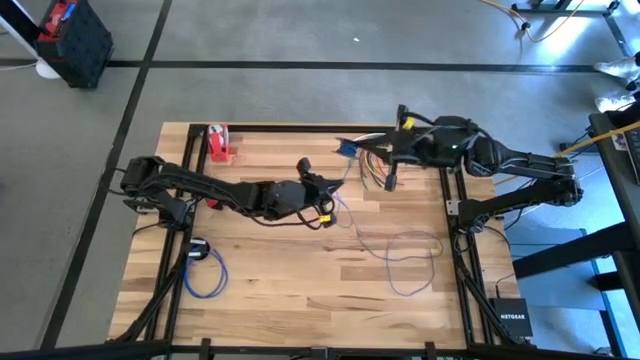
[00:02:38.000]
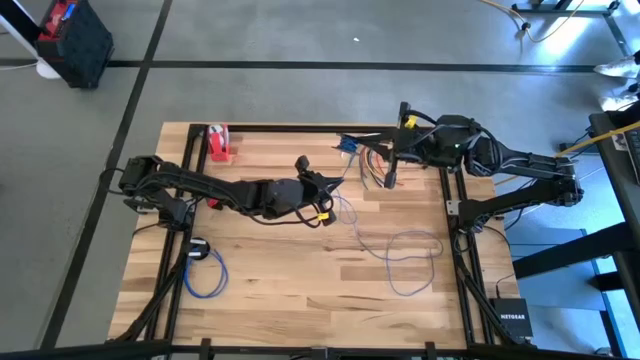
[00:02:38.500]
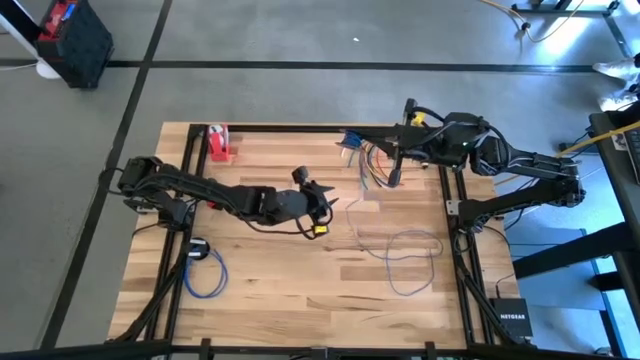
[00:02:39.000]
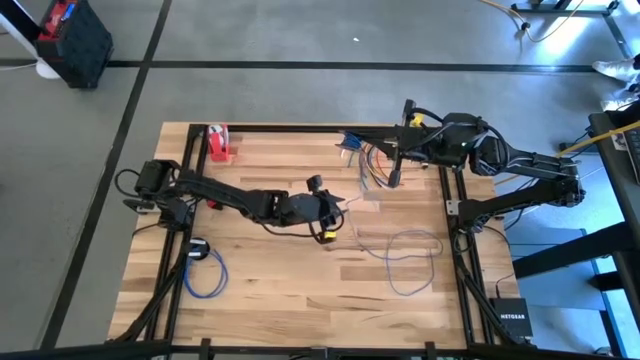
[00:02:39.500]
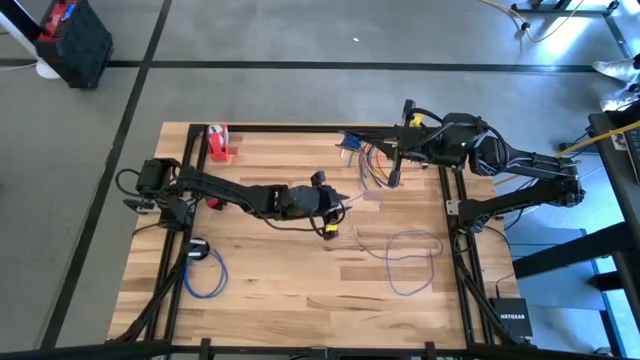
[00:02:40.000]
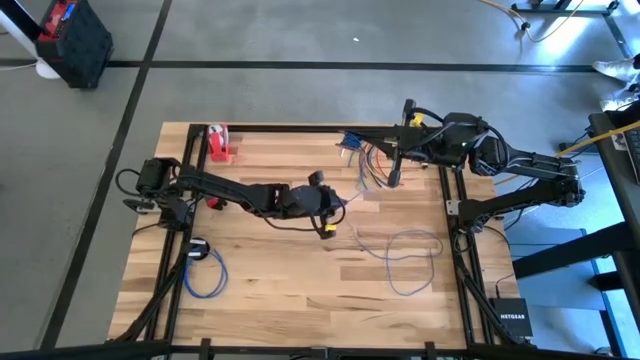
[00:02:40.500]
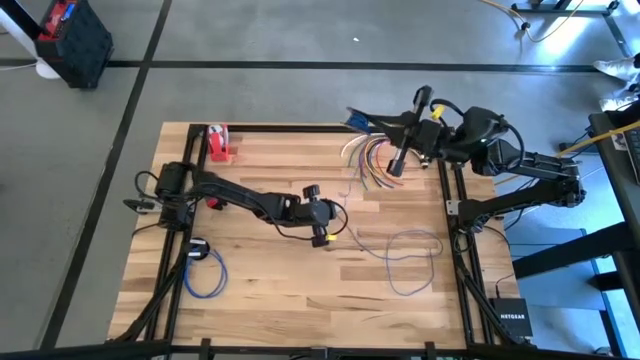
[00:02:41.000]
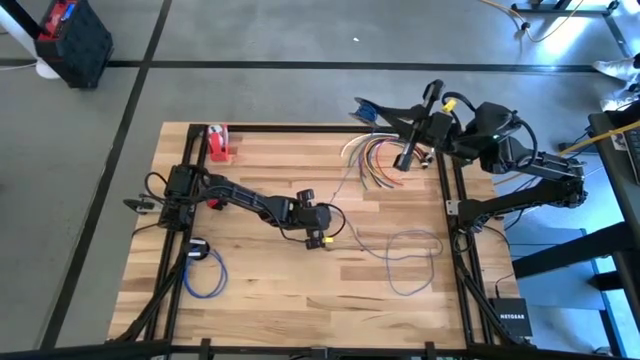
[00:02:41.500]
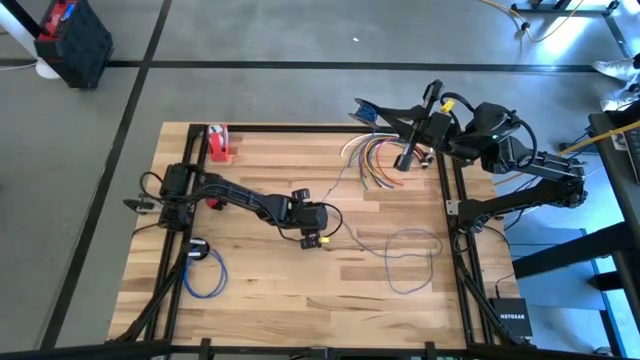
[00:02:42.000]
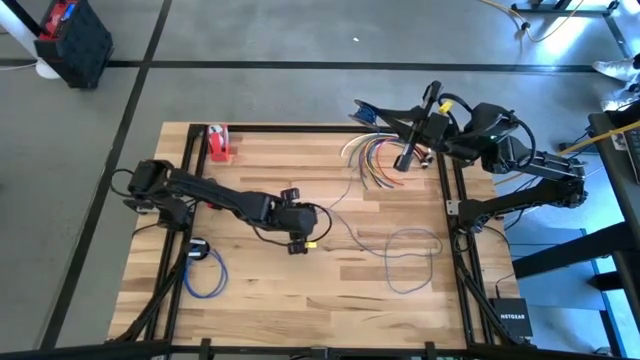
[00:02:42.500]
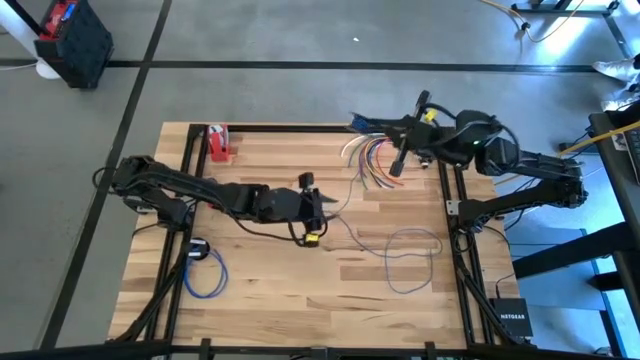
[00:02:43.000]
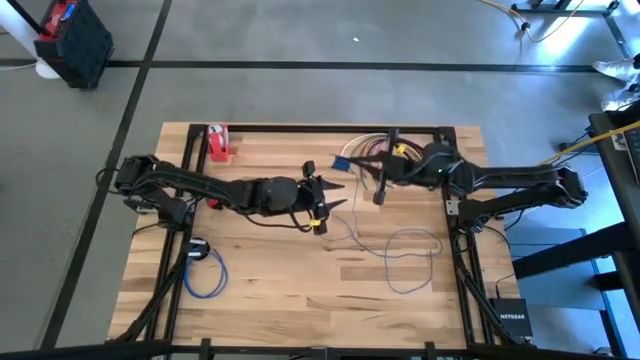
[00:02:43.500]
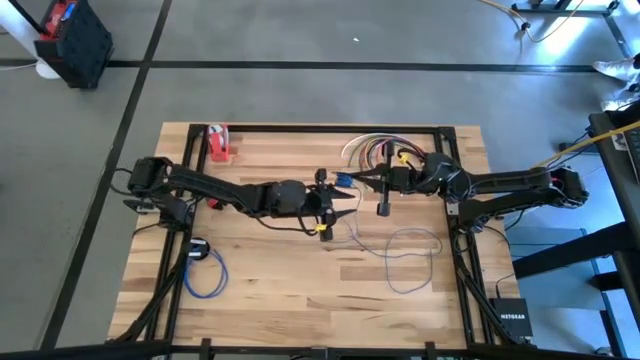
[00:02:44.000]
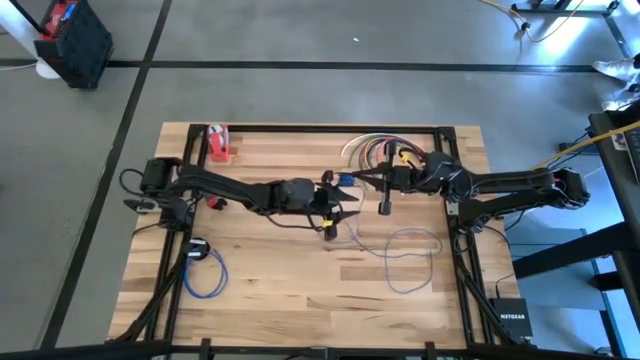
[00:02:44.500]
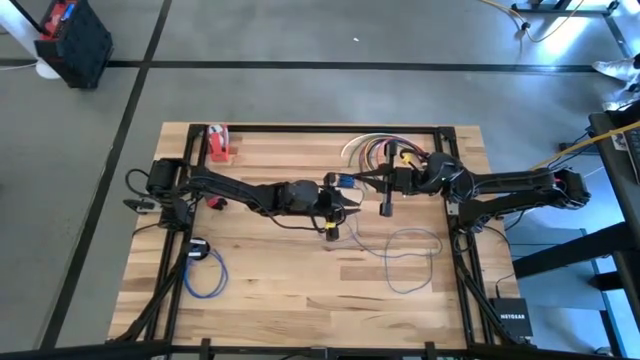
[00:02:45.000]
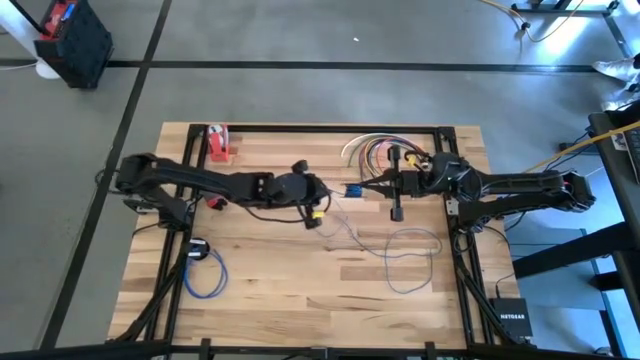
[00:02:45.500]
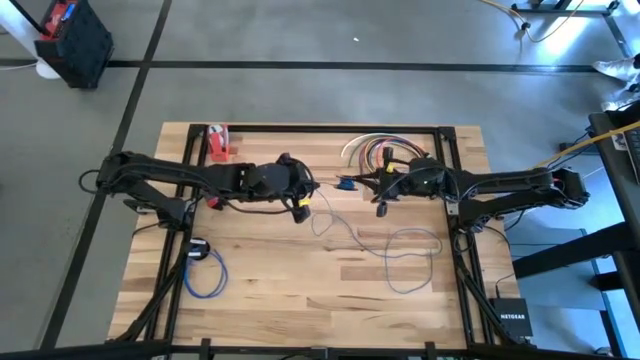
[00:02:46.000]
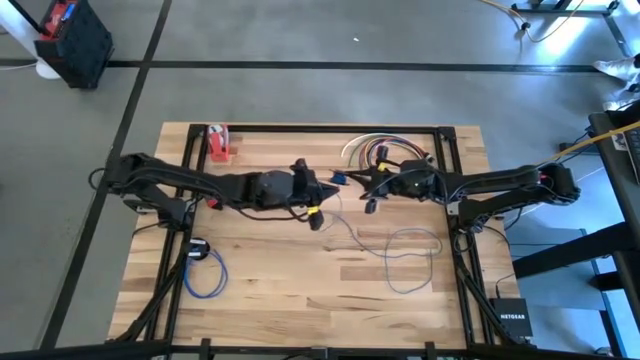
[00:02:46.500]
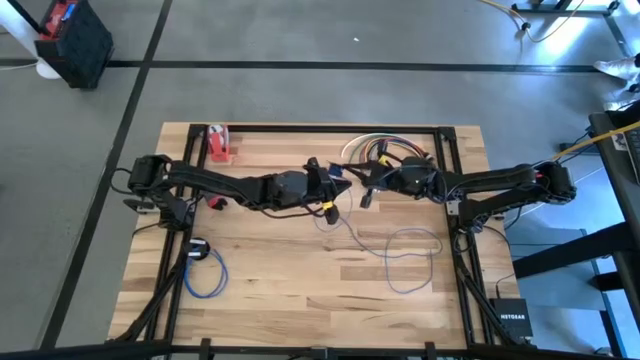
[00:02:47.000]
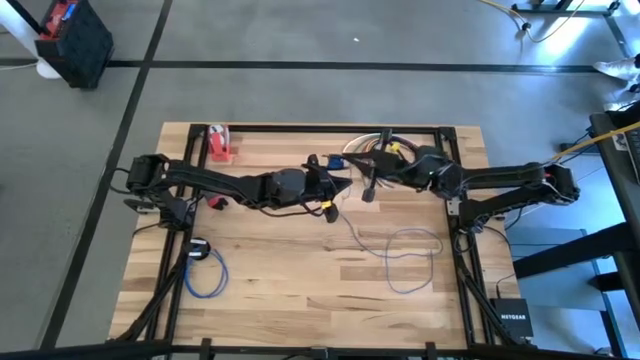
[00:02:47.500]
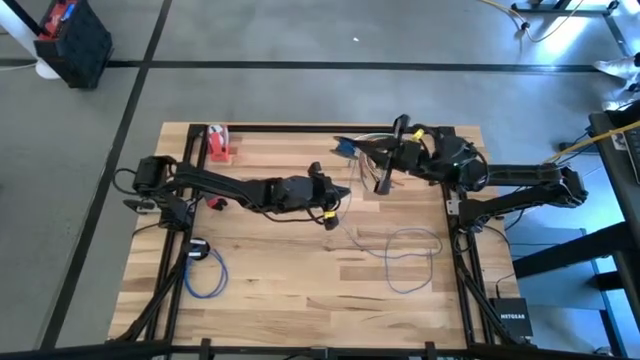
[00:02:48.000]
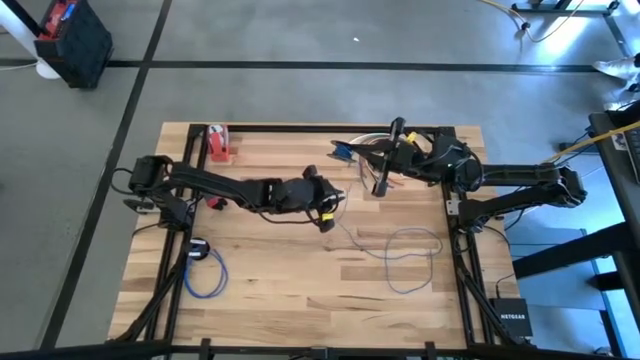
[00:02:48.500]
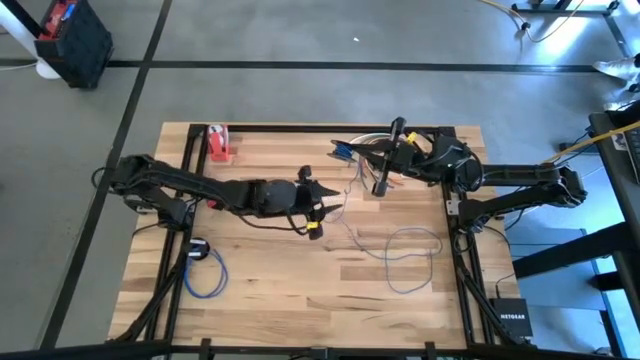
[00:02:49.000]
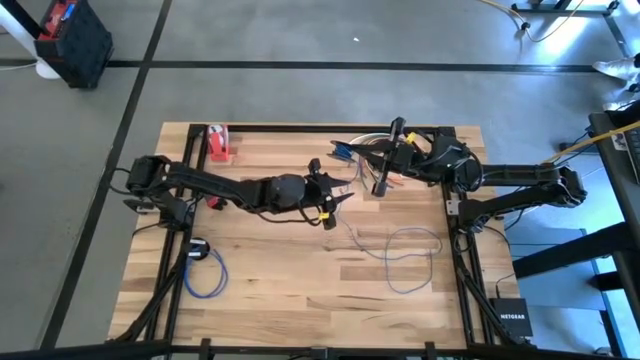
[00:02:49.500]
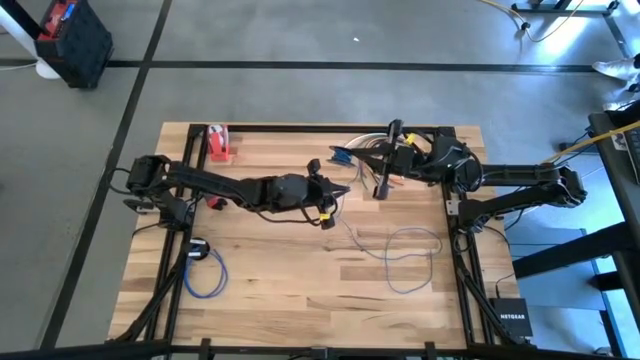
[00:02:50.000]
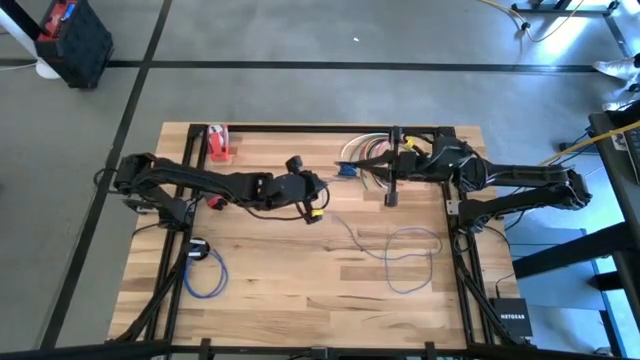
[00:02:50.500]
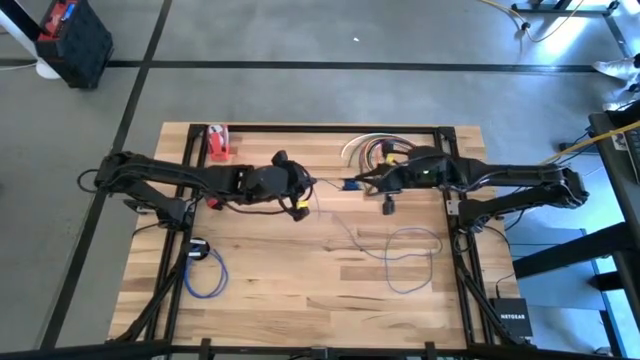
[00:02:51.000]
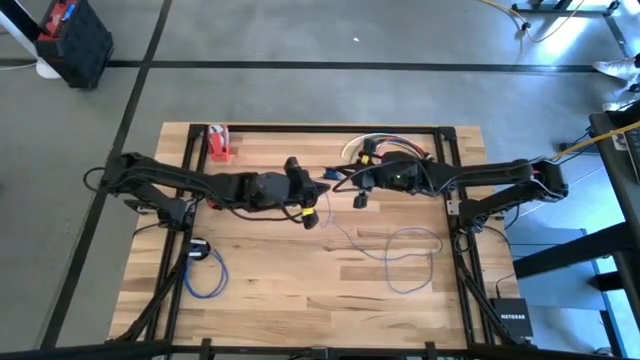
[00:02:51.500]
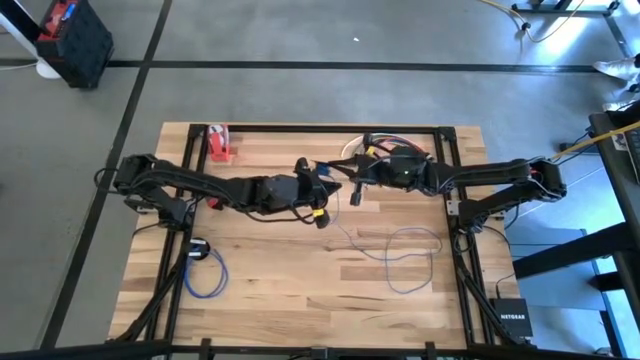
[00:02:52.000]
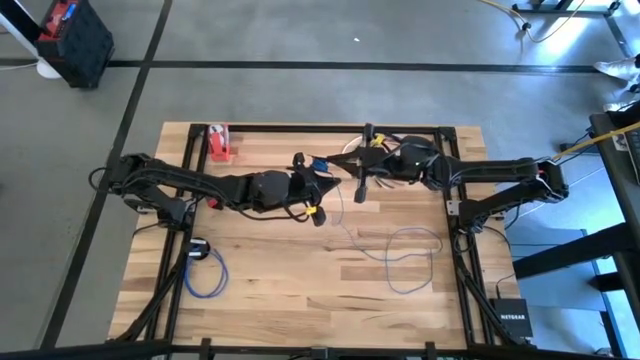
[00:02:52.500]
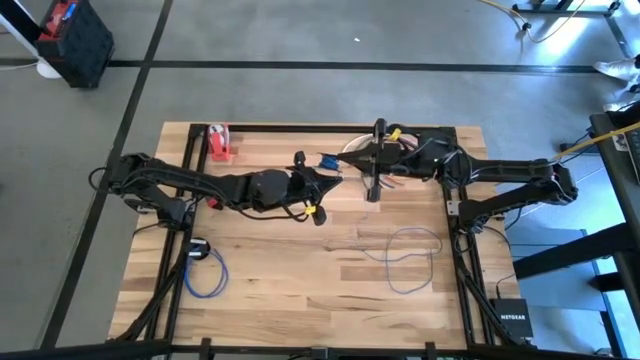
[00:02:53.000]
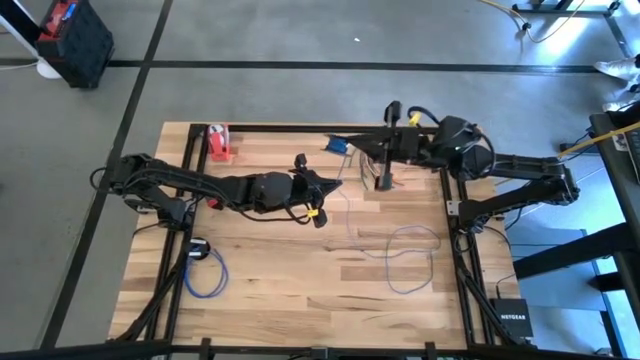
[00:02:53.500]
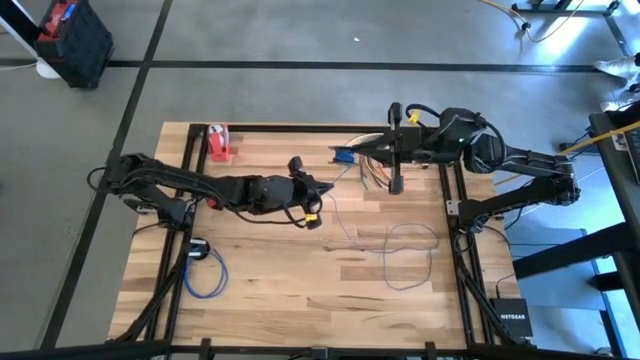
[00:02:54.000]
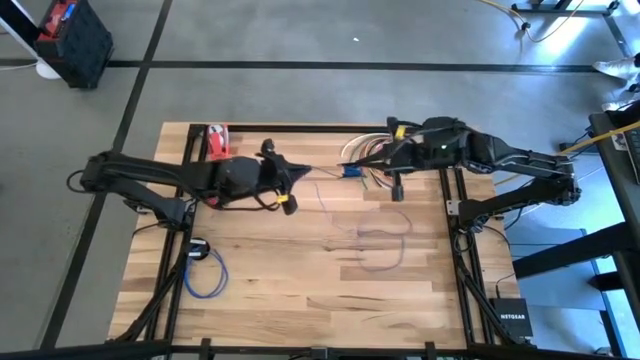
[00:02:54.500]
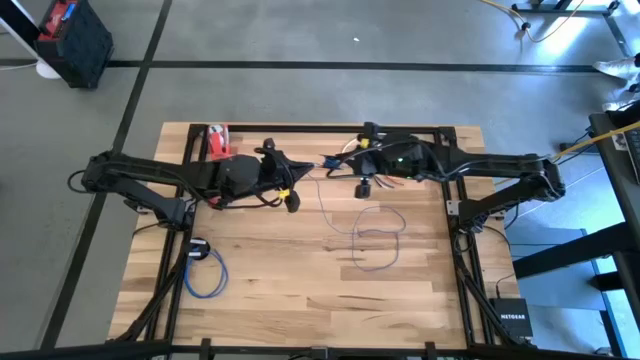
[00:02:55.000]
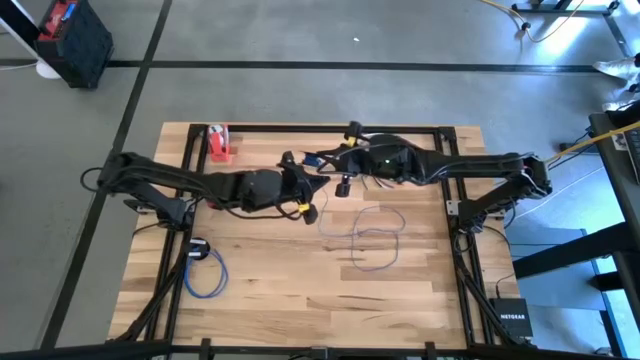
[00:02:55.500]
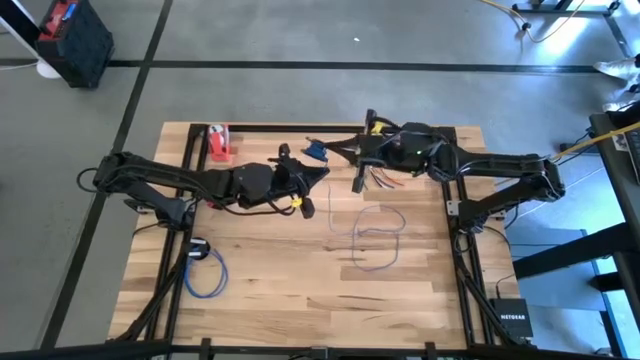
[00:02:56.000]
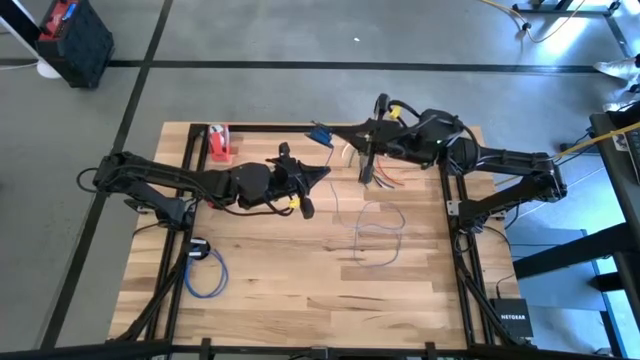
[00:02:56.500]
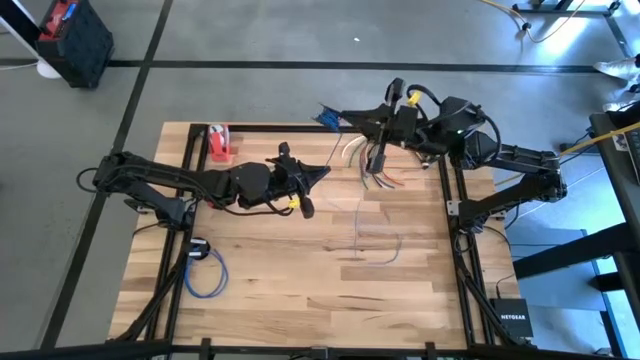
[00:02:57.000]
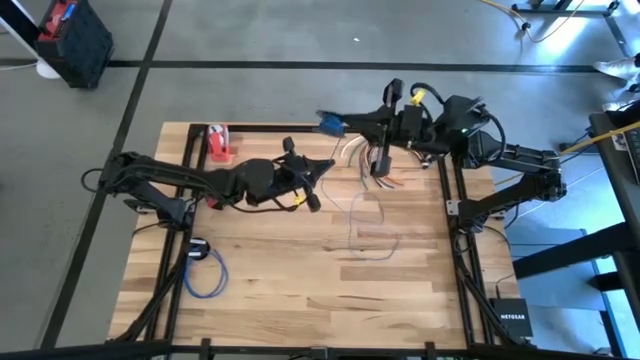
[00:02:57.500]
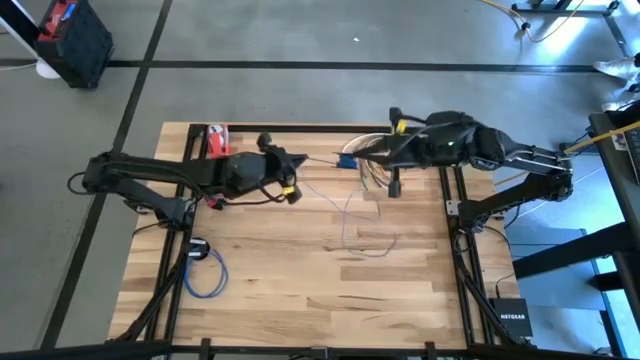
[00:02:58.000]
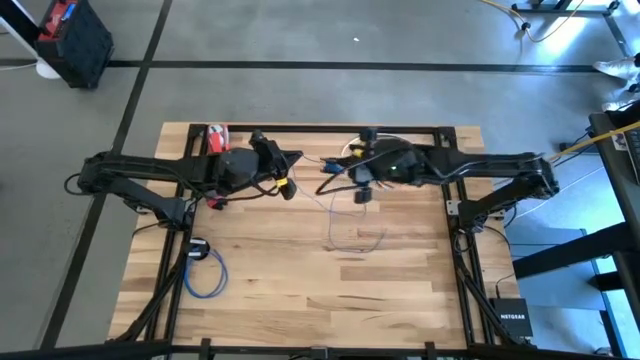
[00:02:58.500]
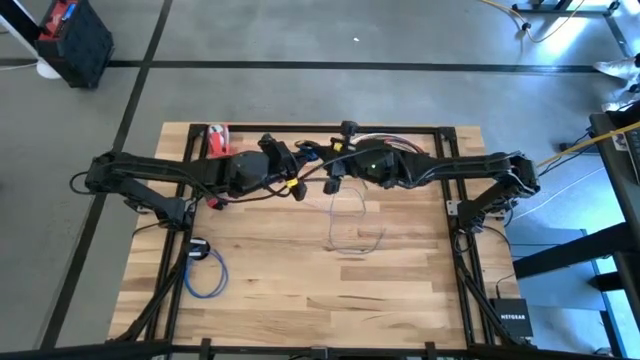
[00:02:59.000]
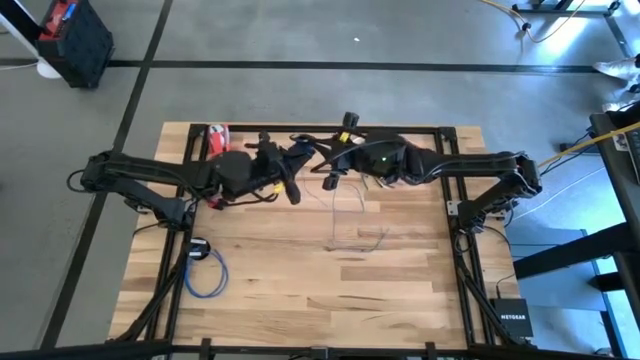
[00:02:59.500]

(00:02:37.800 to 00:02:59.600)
Task: Coil cords
Coil the blue cable wire on the black spool

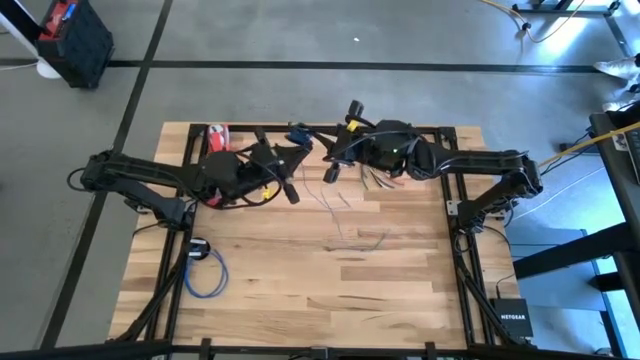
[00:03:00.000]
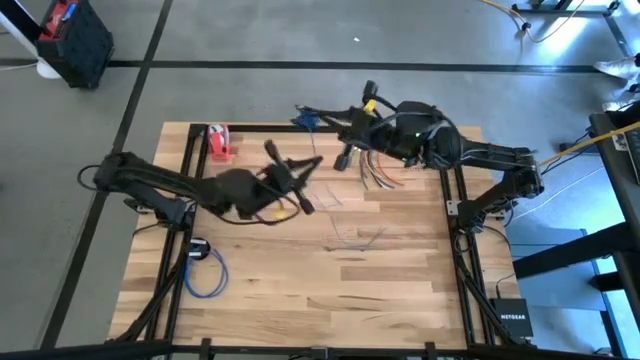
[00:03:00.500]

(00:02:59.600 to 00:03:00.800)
Coil the blue cable wire on the black spool
